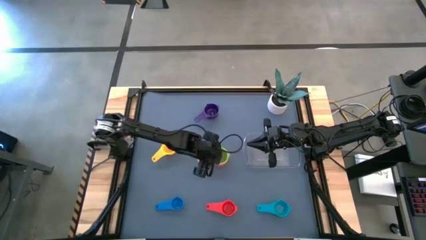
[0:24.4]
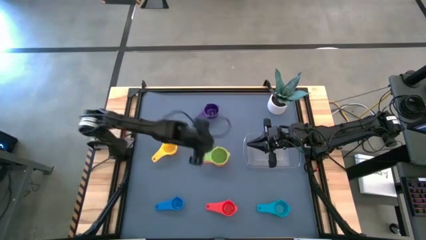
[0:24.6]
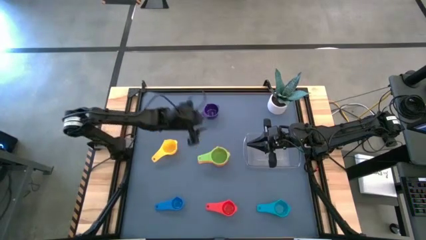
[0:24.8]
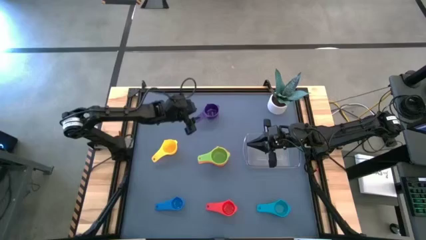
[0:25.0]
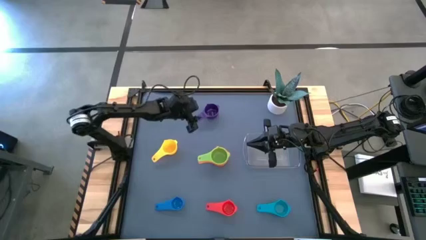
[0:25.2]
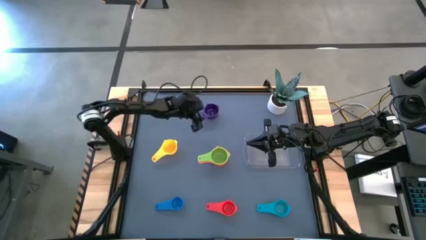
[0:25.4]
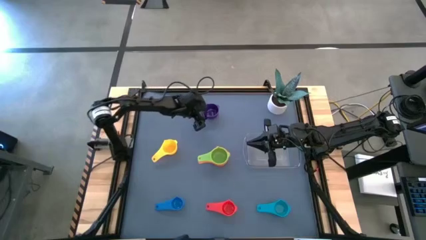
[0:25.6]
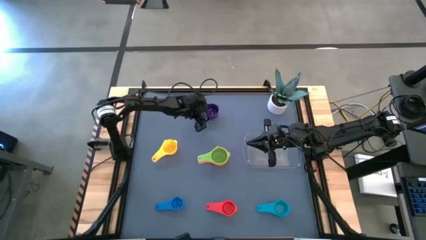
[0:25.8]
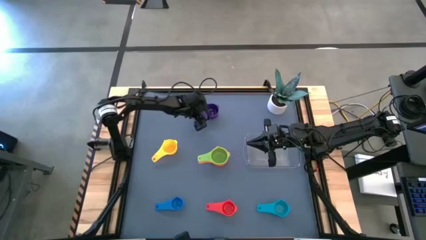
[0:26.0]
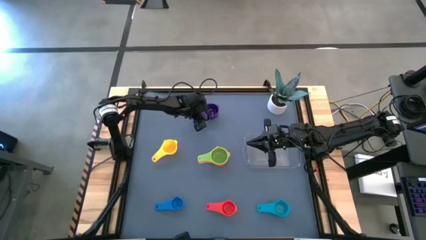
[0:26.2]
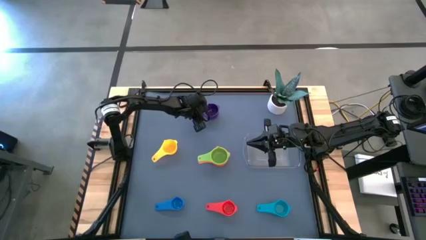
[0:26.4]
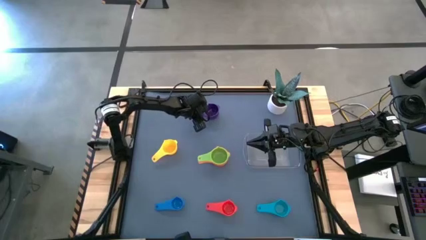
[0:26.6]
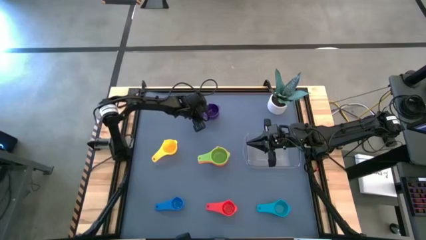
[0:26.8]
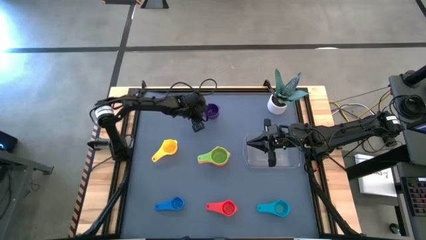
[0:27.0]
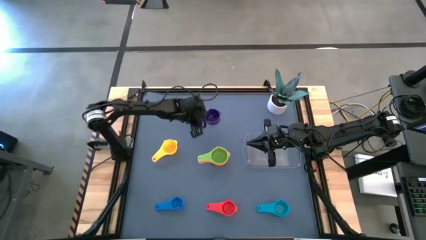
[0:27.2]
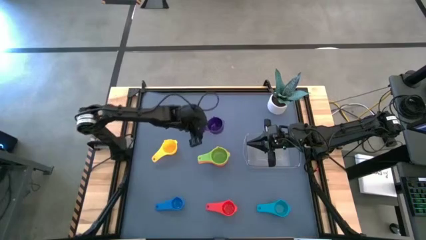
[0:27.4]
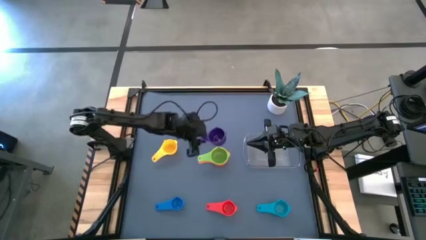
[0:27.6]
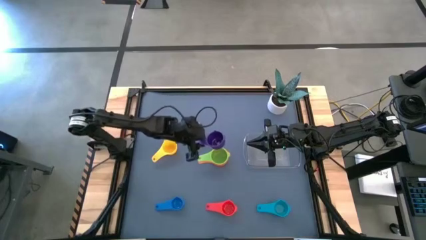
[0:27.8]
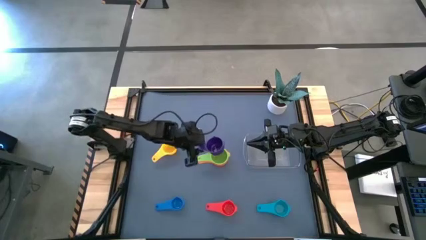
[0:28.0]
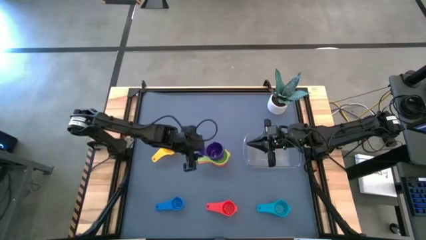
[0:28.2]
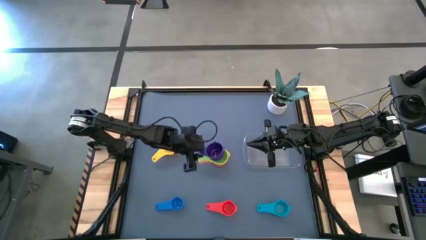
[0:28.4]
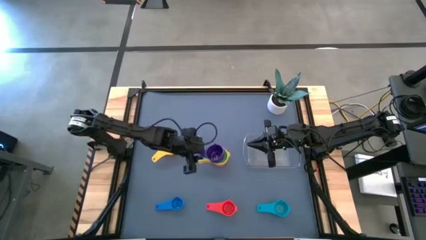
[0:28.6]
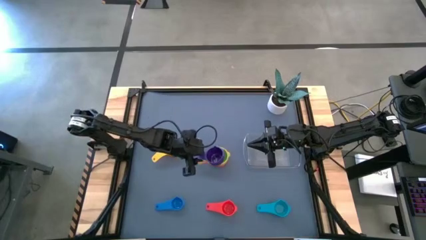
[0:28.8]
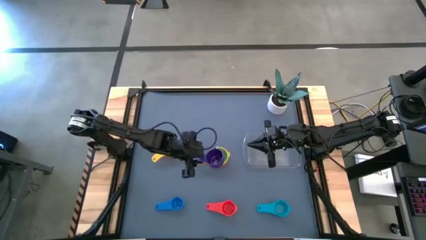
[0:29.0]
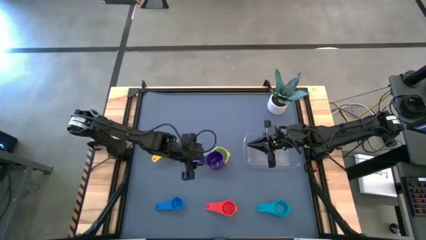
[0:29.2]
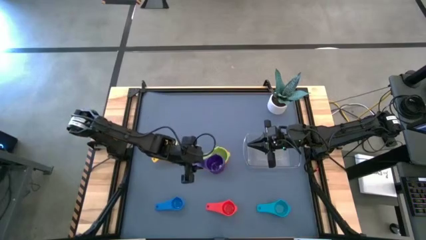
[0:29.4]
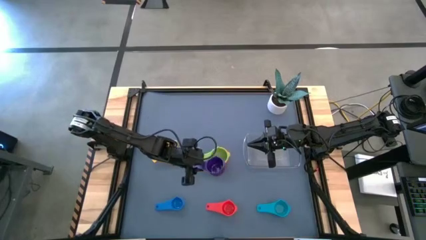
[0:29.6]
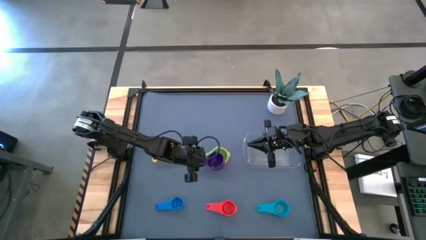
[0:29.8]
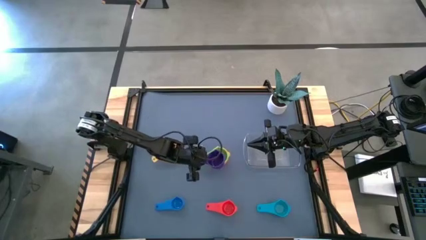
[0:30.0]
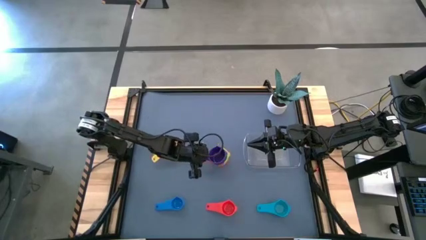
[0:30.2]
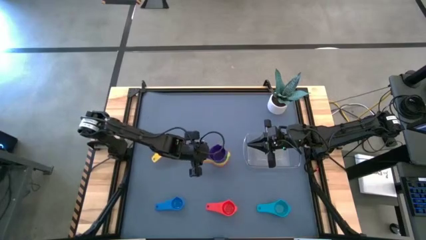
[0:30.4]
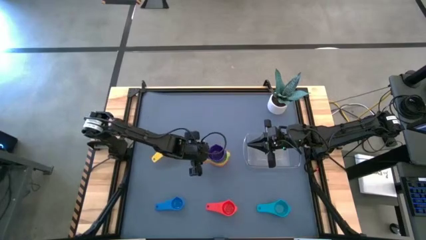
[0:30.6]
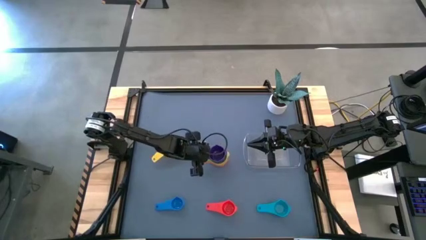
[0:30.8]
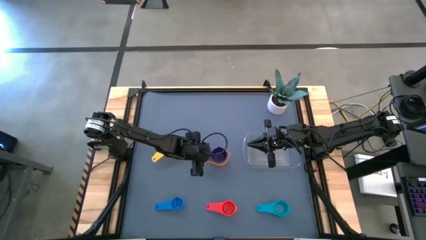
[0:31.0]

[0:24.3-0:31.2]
Task: Nest measuring cups in basket
Stack the violet measuring cup on top of the green measuring cup

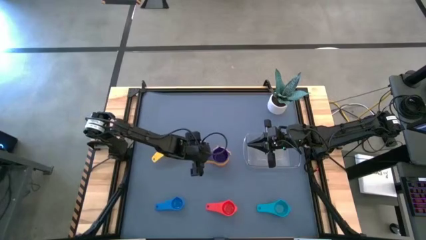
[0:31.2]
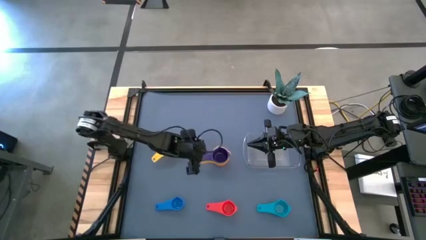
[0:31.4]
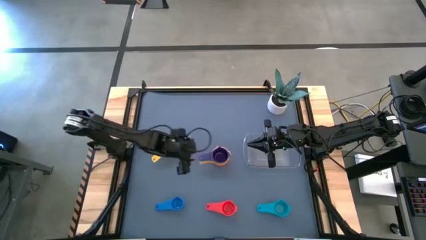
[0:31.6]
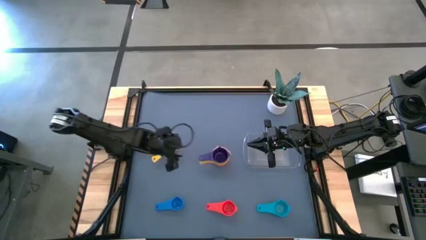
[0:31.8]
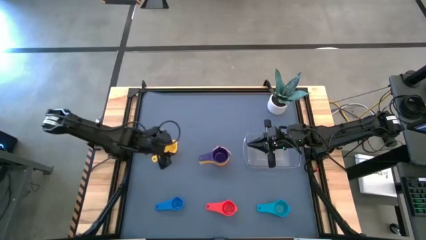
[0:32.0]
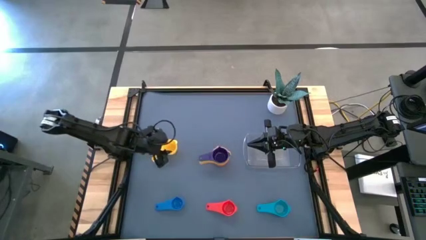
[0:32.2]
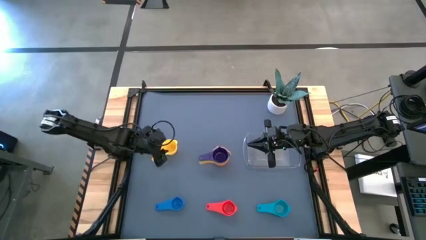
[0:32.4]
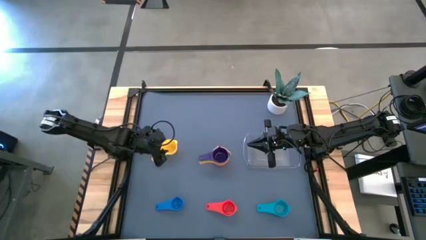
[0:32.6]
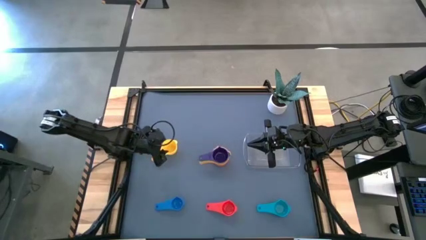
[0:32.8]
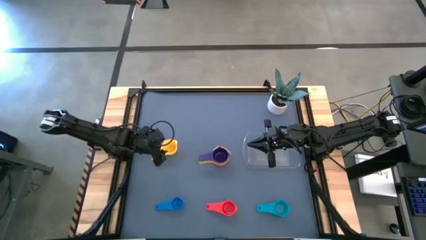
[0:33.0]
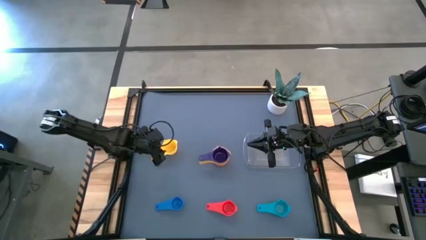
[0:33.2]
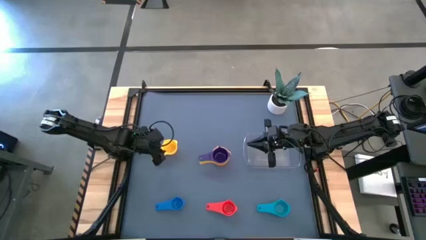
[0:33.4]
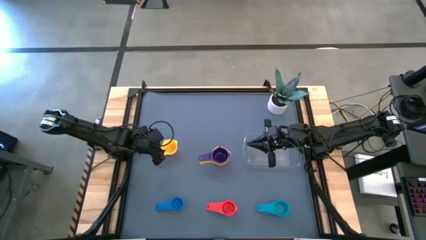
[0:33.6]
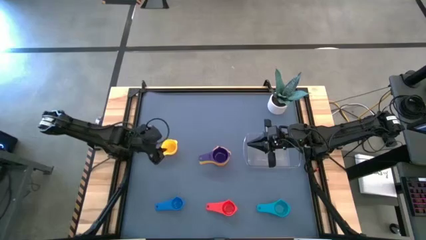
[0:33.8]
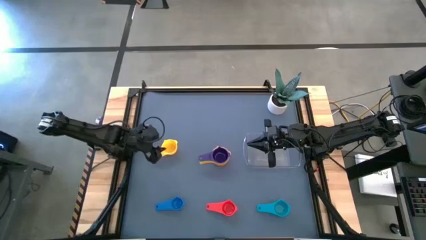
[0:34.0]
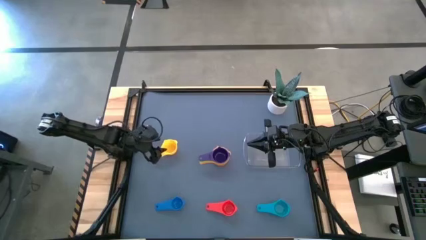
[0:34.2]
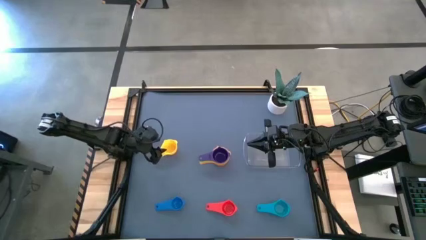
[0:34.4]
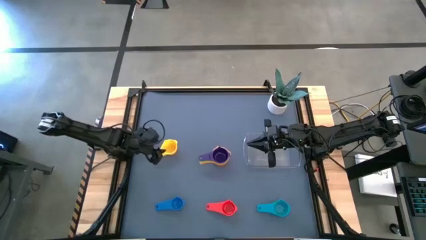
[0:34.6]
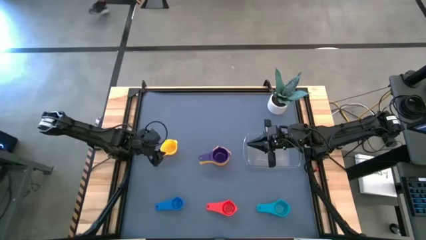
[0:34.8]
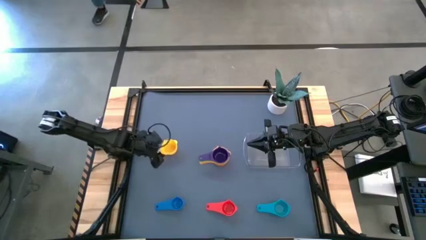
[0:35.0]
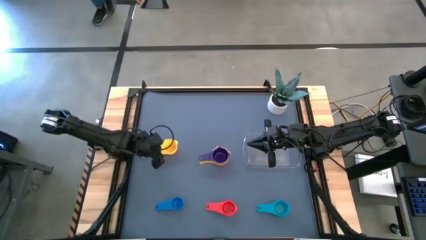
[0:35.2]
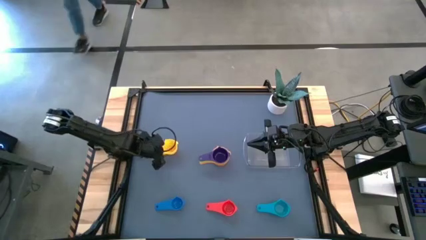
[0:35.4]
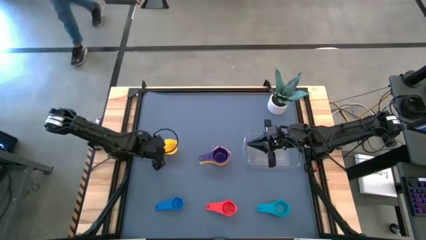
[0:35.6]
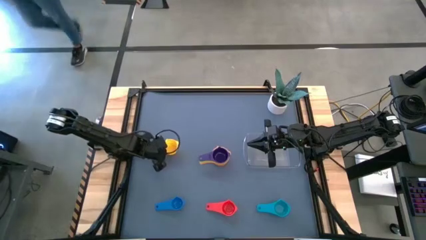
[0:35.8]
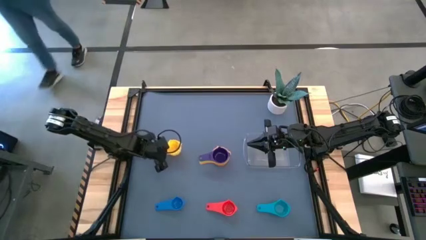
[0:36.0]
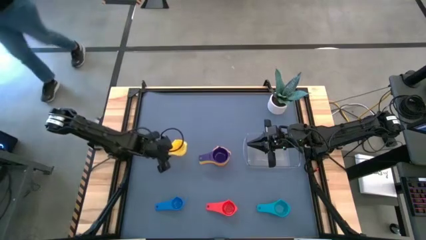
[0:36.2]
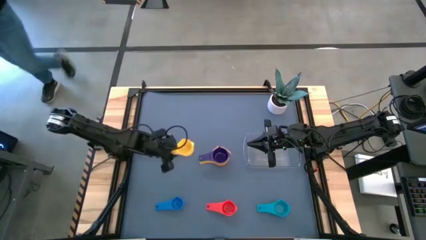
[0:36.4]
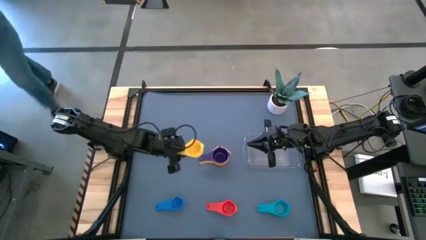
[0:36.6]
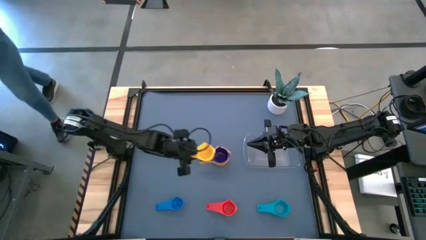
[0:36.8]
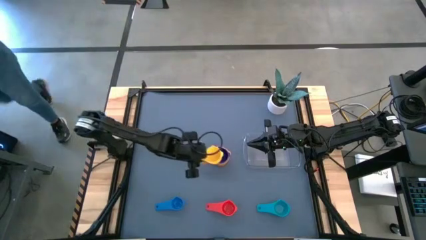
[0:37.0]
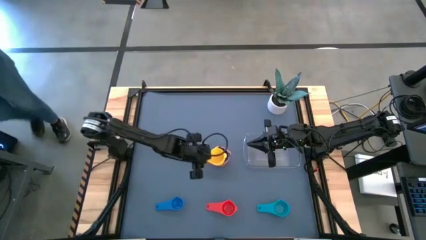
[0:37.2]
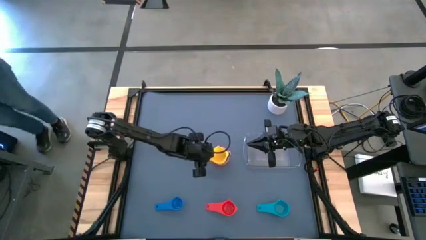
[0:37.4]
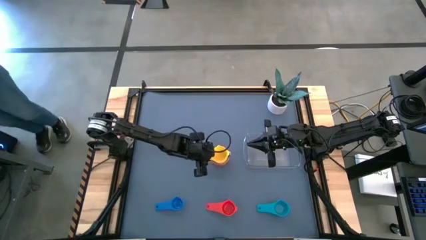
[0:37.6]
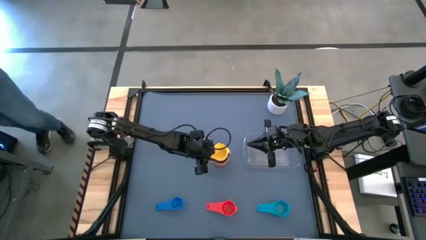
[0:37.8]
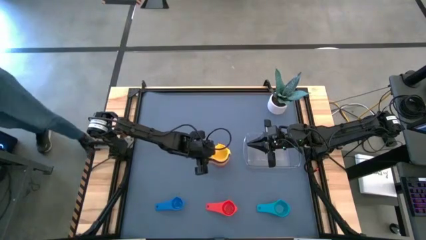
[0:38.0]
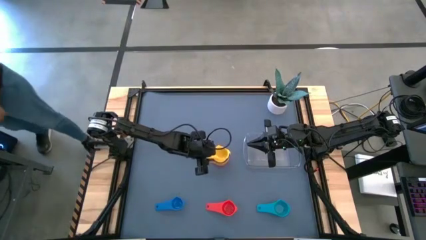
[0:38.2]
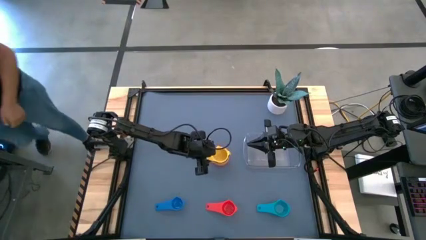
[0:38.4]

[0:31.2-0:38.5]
Stack the yellow measuring cup on top of the violet measuring cup
